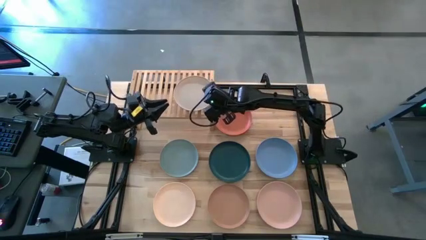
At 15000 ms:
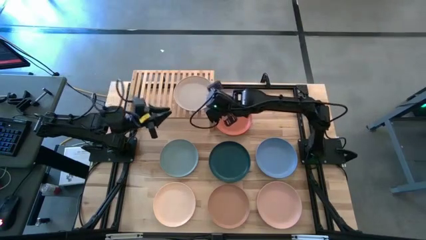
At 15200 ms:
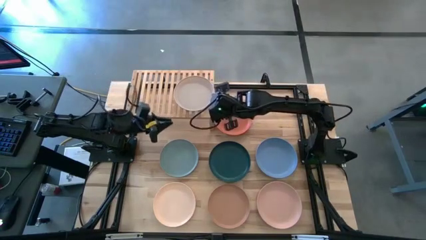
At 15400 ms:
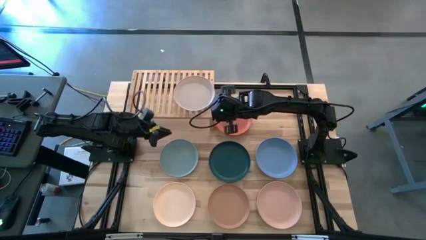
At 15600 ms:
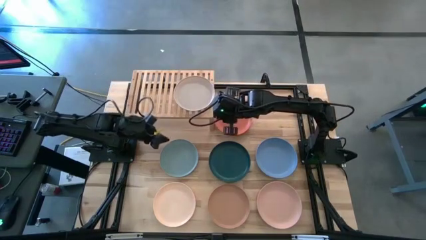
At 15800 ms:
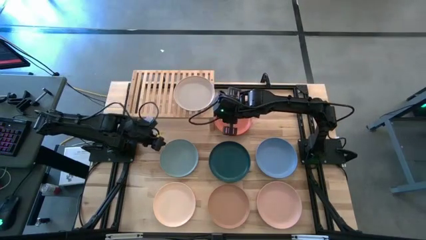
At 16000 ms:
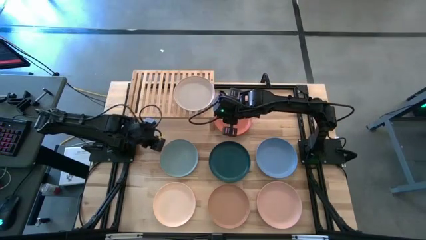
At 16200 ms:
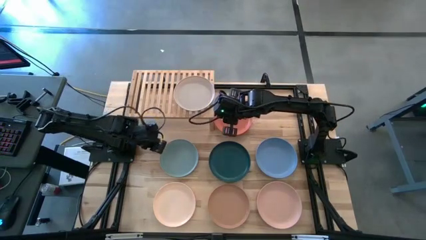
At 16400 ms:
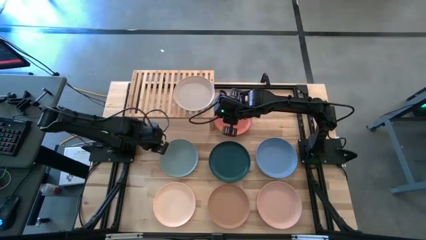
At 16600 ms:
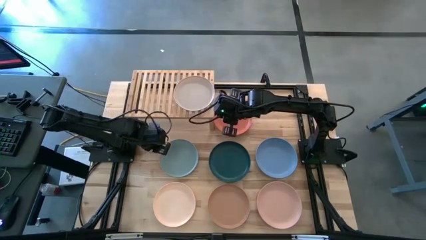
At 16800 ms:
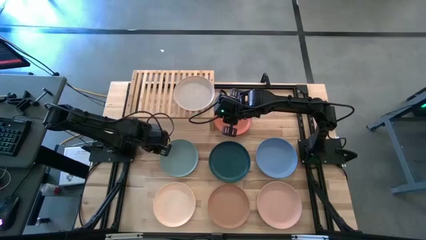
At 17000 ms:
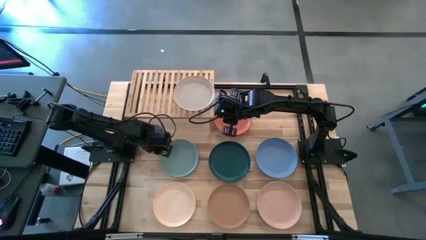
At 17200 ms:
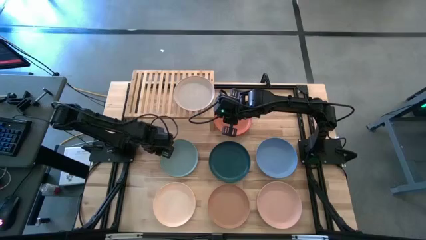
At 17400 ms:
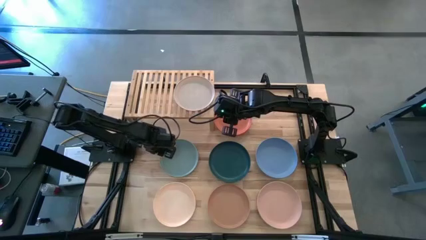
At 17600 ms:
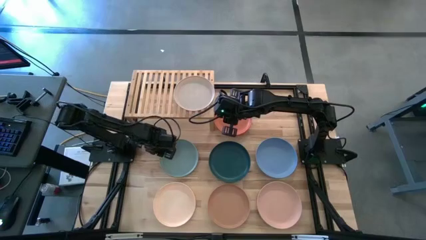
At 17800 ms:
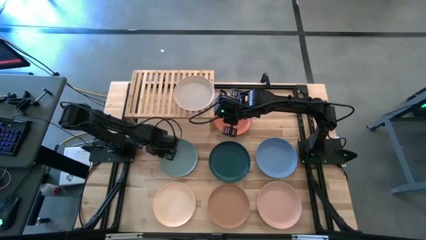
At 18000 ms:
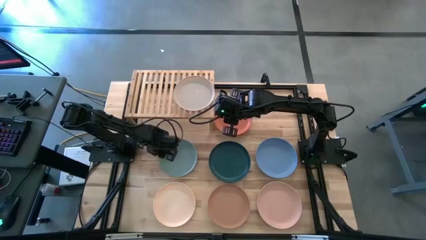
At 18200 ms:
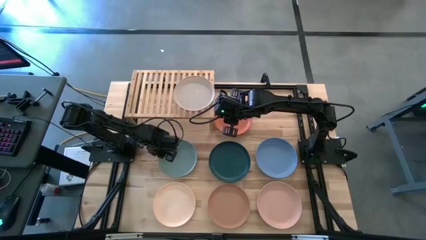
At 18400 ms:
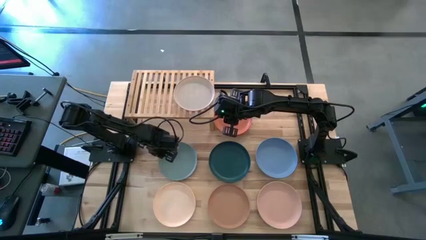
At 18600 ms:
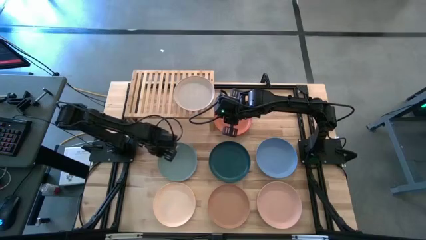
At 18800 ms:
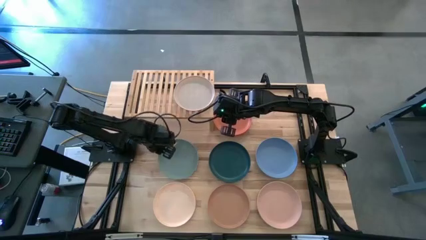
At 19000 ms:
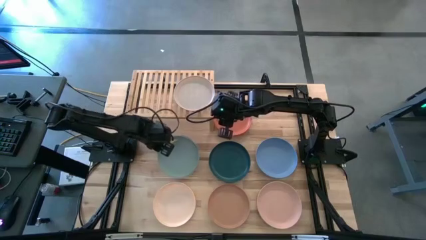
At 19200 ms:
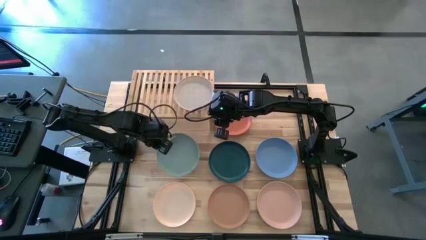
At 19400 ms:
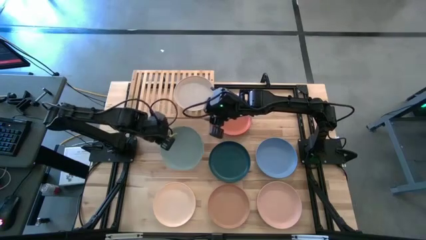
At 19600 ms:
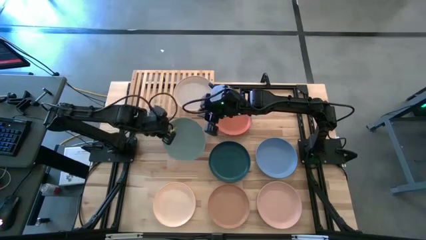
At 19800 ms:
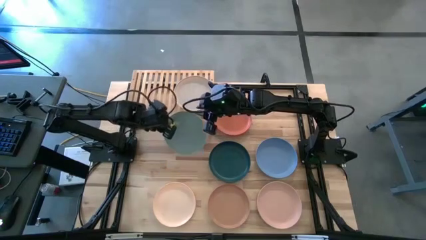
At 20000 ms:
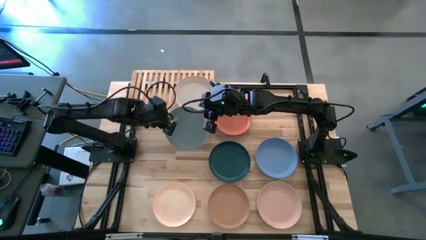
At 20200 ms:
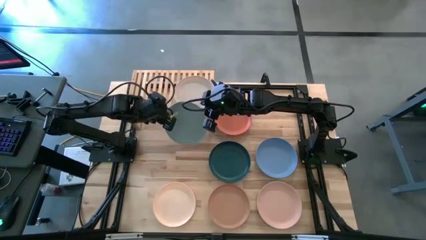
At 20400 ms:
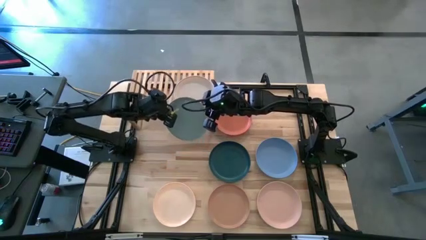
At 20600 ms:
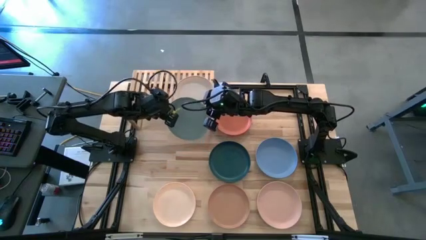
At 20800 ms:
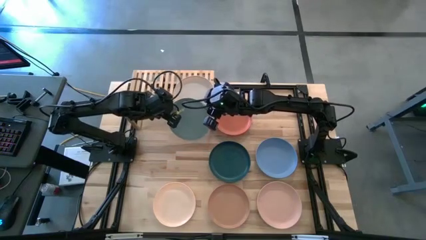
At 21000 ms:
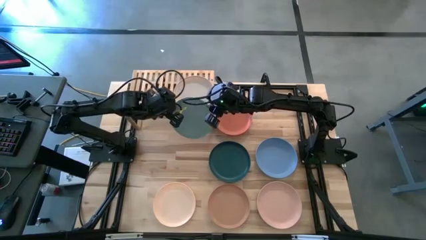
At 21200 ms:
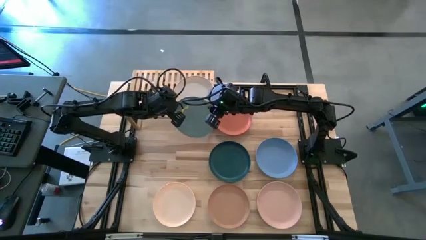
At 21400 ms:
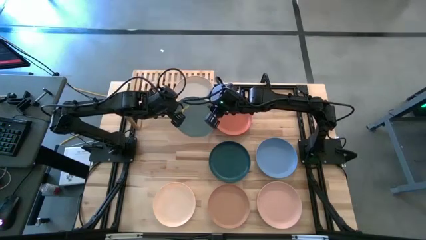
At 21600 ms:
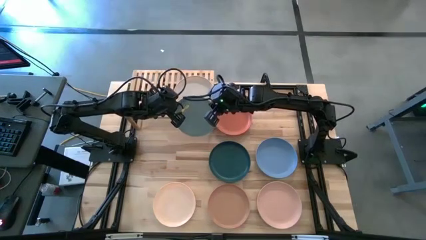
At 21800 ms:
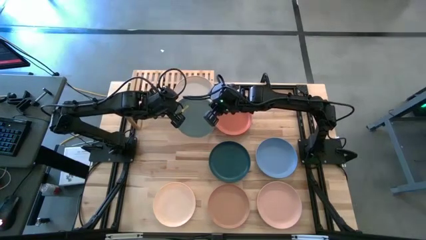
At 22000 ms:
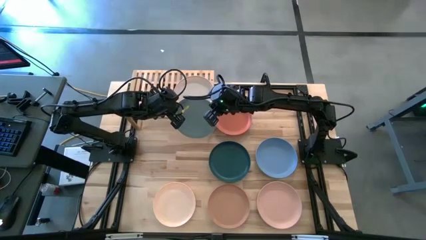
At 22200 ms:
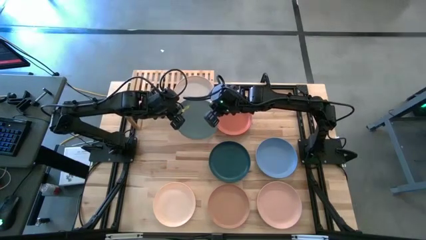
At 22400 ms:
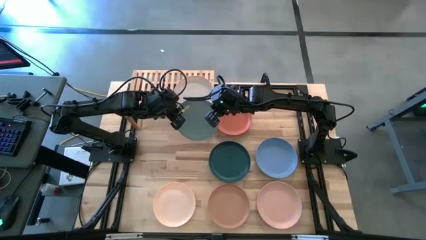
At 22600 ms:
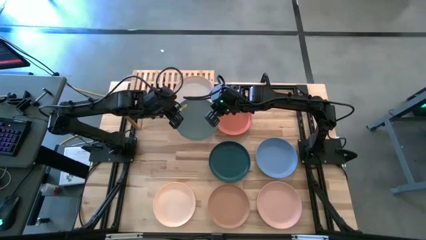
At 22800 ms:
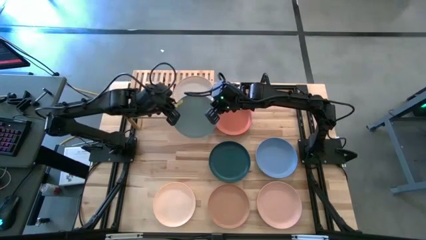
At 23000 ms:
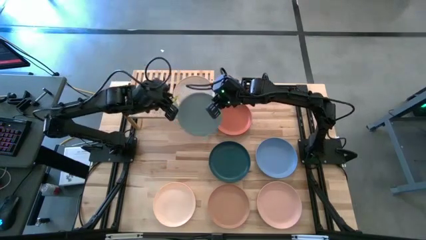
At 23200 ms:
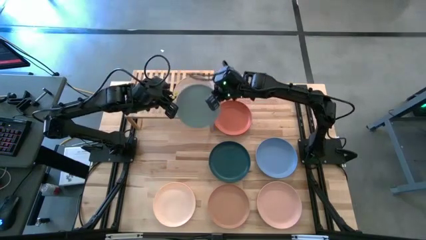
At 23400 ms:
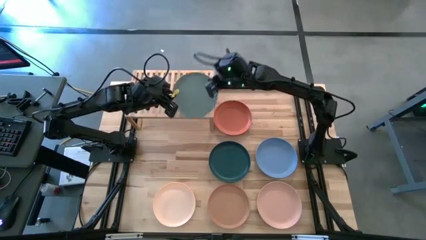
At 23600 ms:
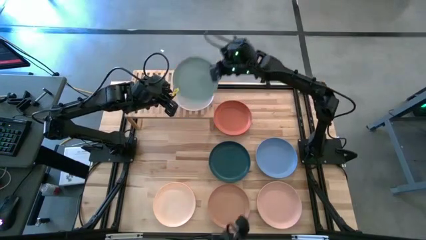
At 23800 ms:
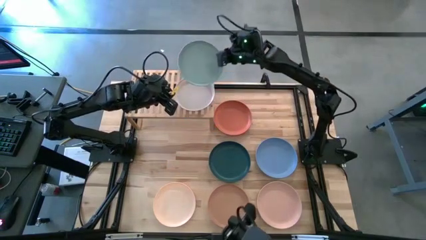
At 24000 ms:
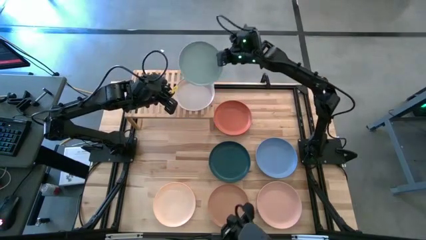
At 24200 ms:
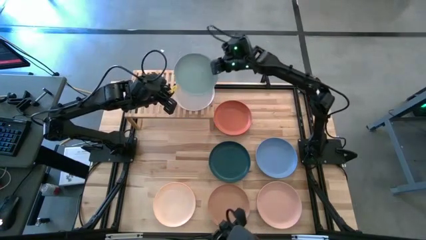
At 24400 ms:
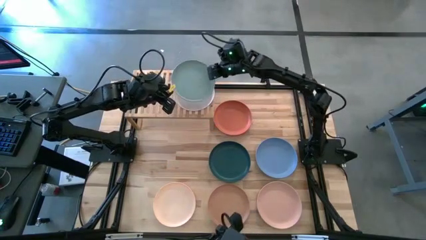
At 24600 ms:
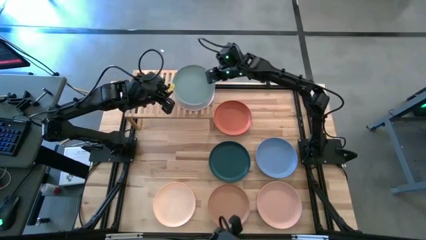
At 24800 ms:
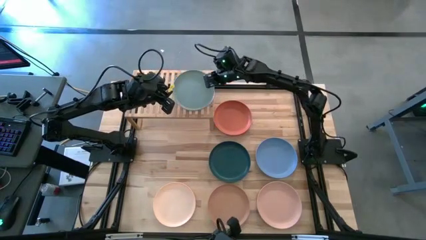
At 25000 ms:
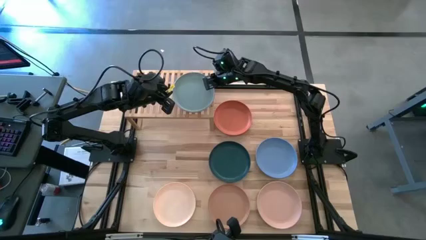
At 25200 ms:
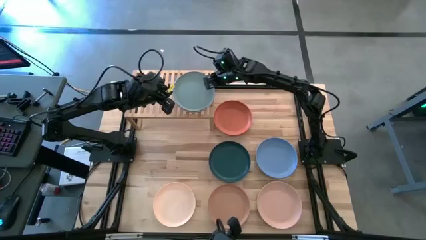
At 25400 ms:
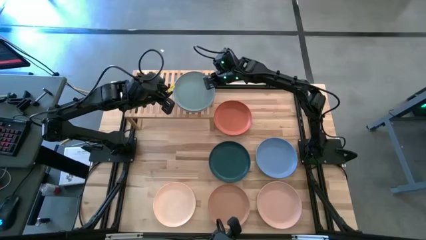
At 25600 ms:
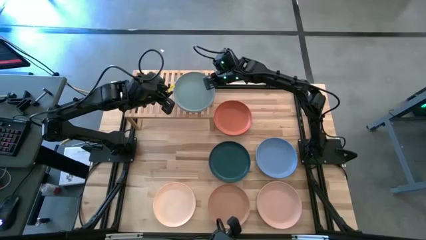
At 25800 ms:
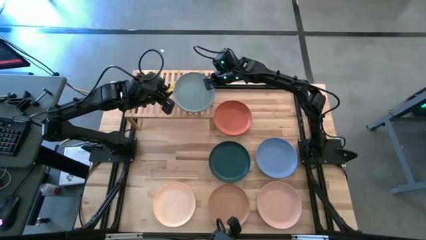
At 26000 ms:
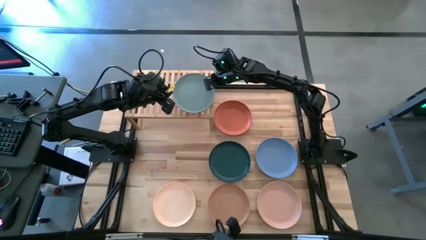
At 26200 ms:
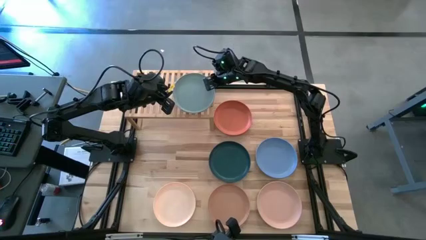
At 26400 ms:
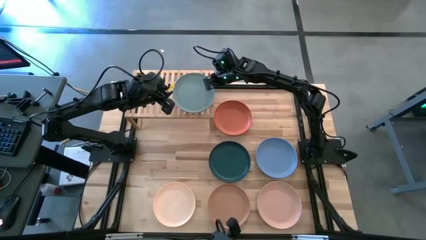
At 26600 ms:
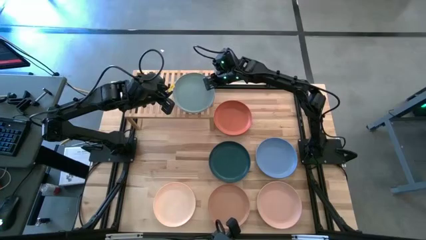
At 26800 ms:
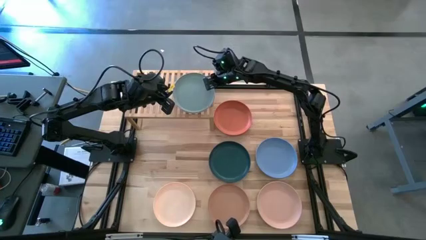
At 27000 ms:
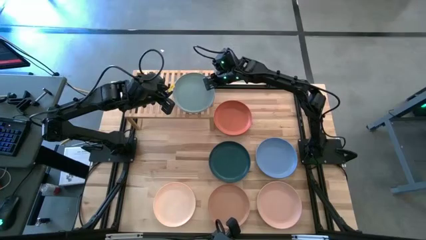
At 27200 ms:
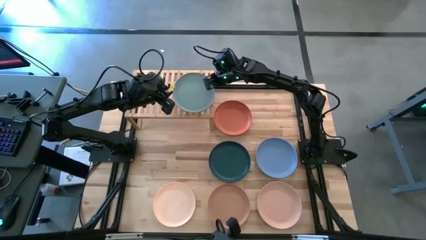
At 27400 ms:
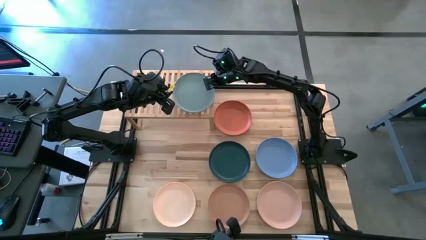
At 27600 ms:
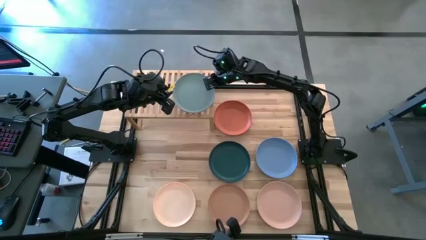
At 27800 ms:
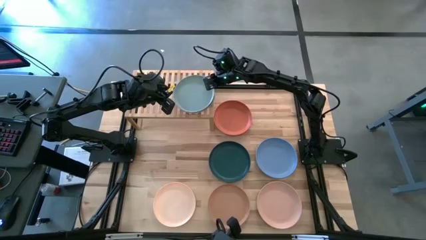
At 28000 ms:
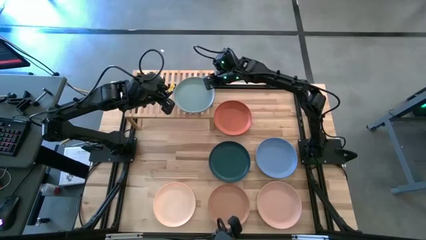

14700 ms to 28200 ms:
Task: Place and stack plates onto a shelf
Stack the light blue plate on top of the white plate on the shelf
